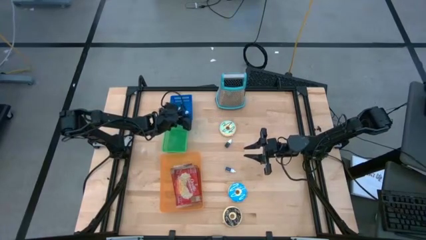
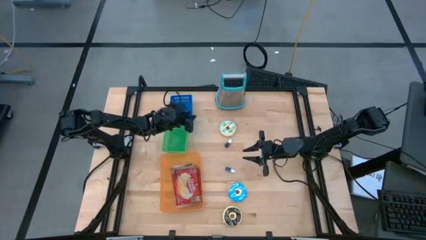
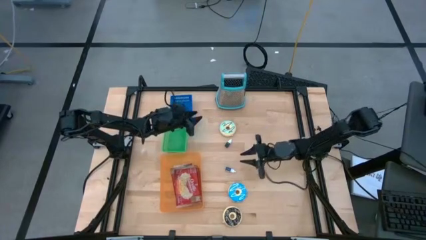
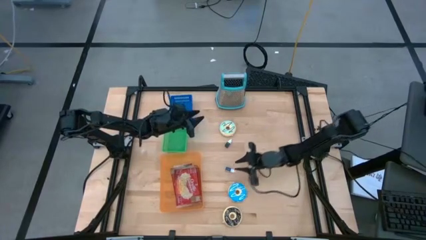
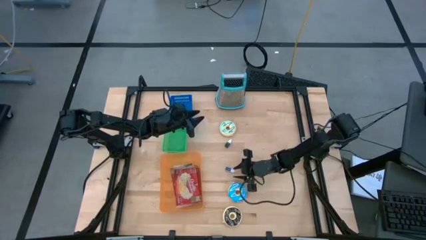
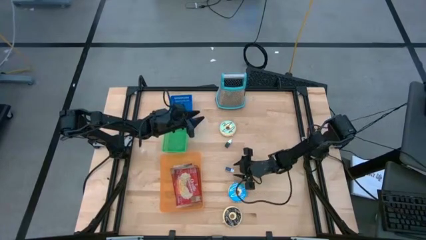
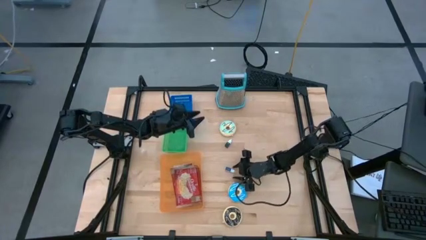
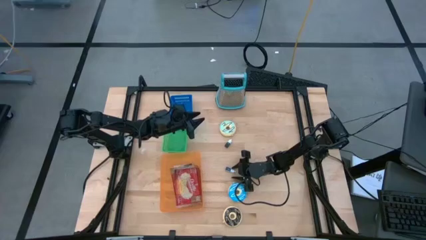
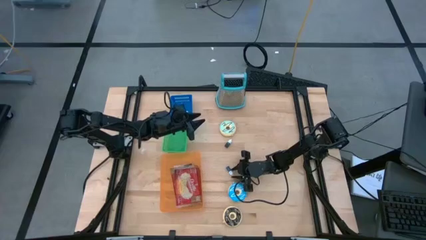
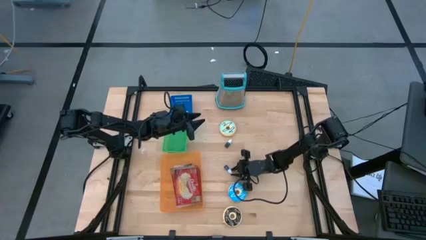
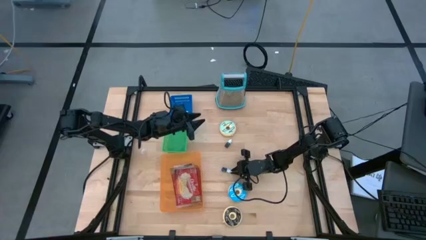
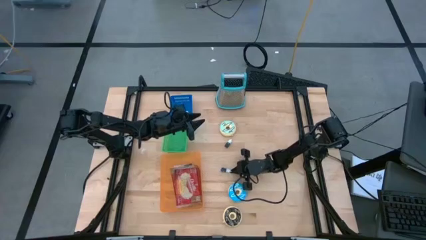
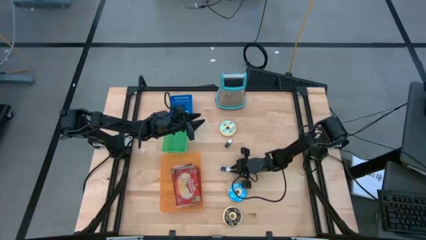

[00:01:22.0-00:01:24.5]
Put the blue food coloring bottle into the blue bin

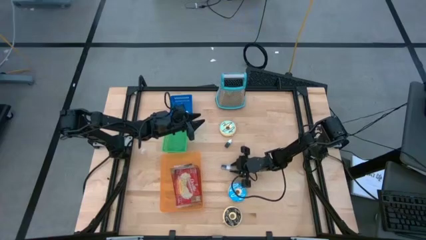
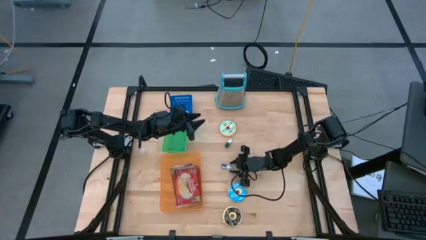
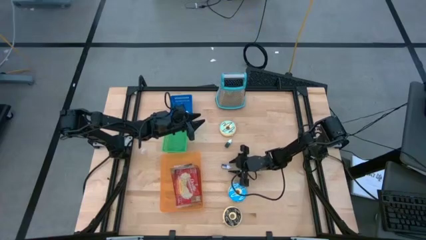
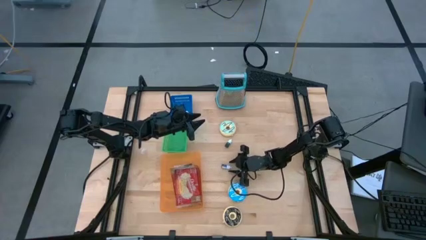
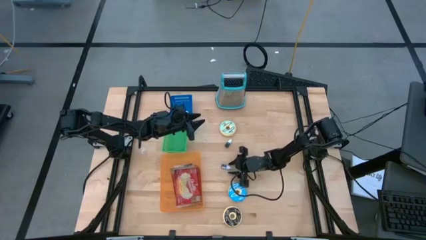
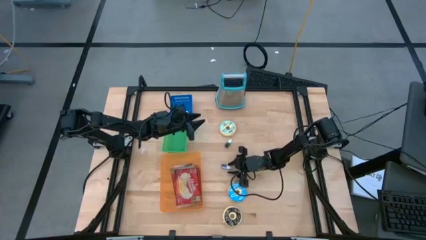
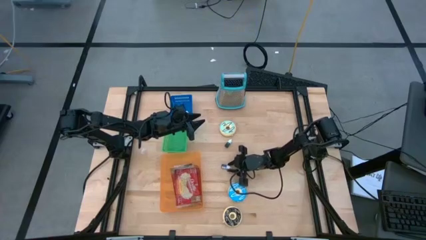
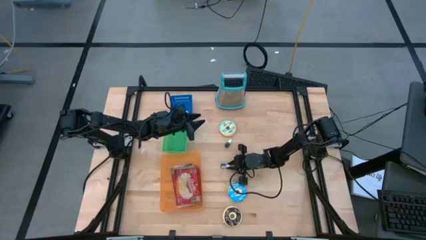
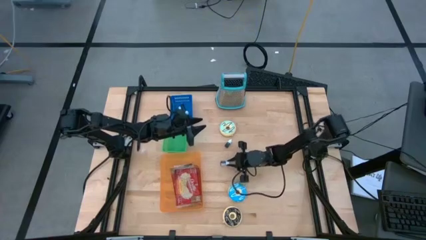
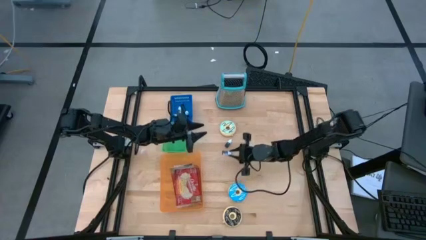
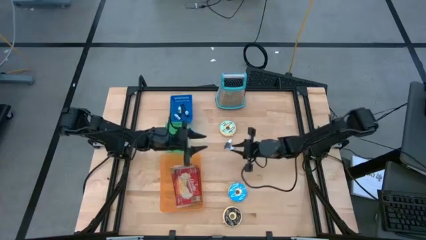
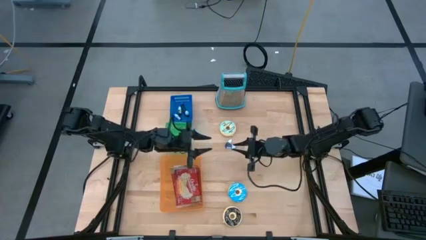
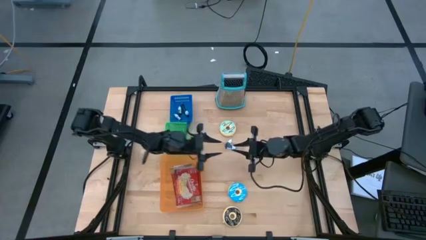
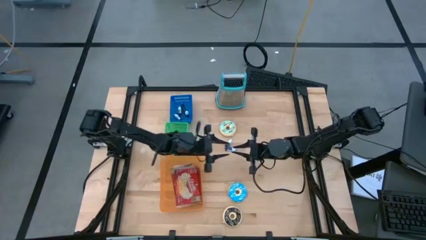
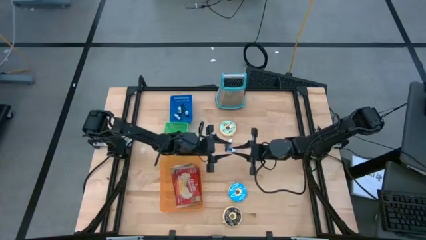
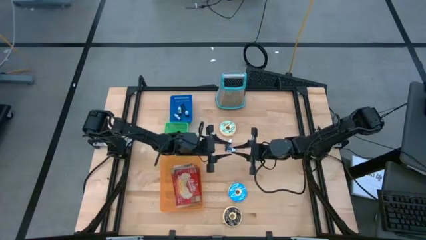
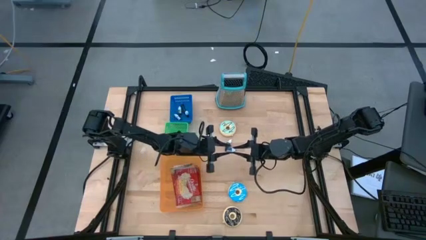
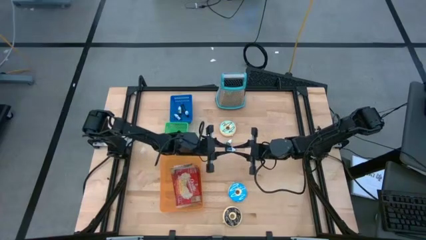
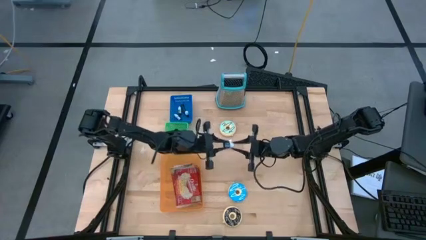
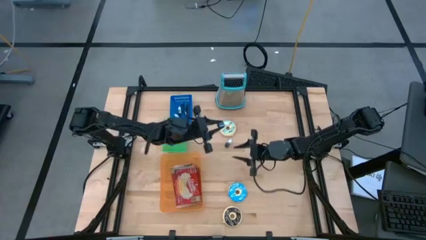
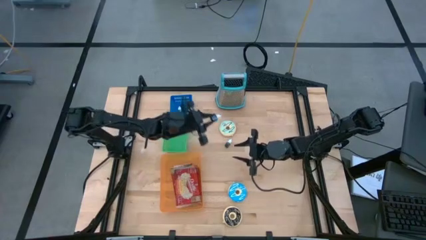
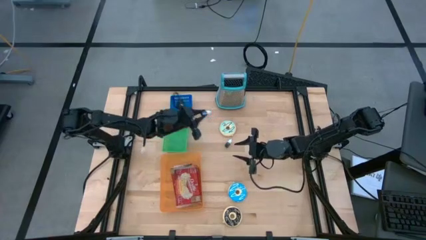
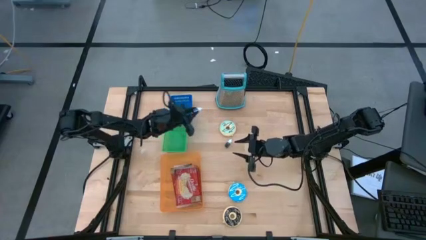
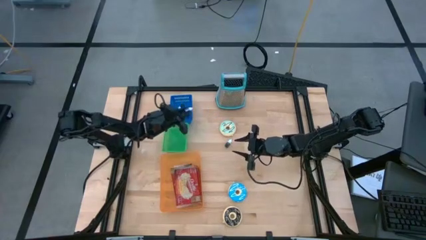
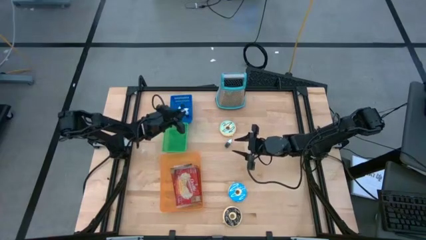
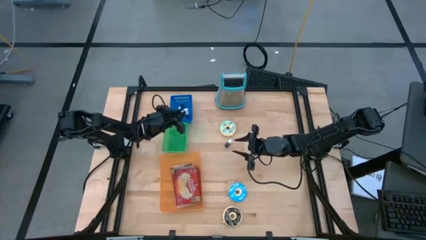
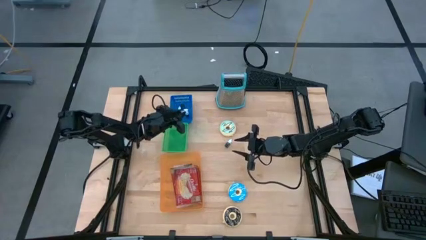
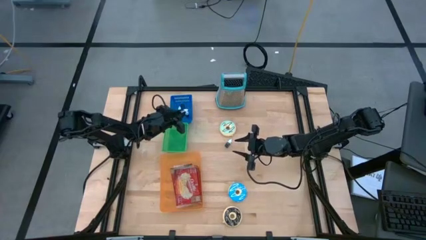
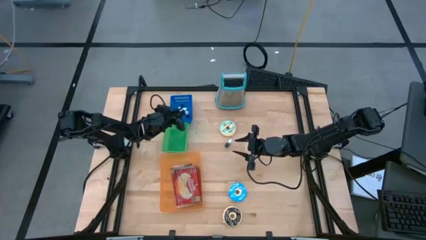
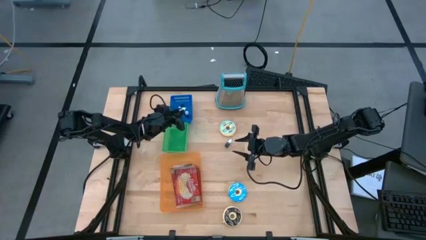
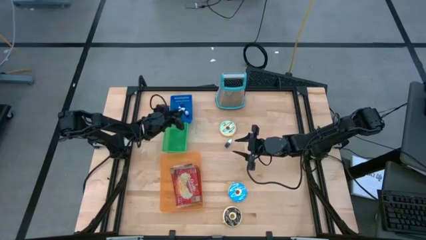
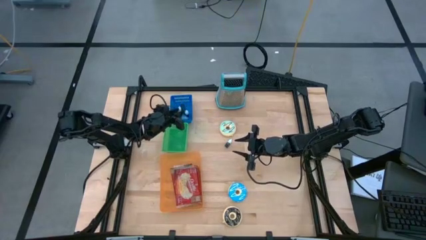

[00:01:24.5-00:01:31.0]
Put the blue food coloring bottle into the blue bin

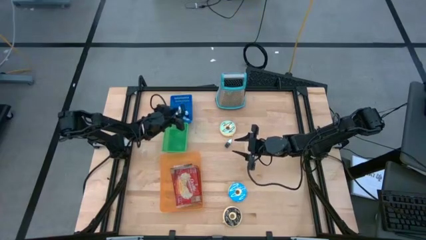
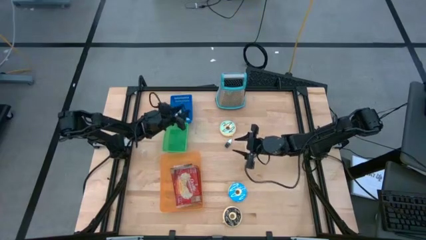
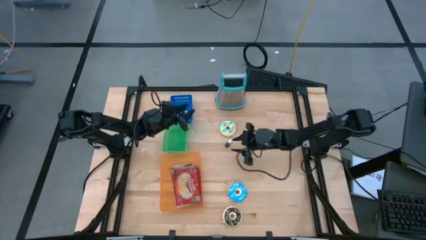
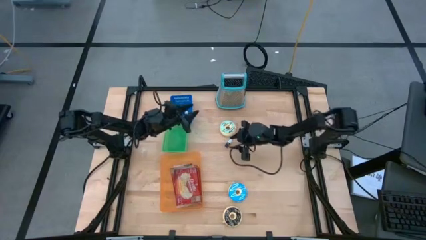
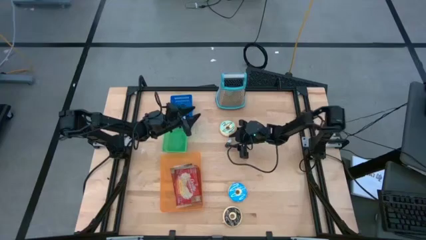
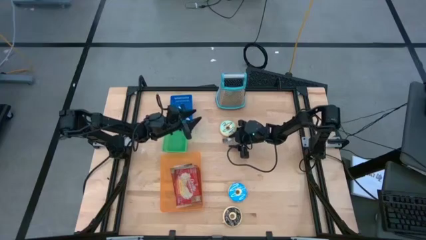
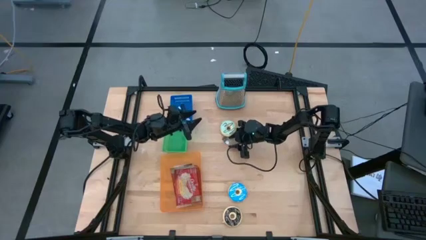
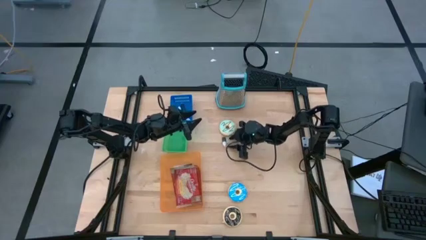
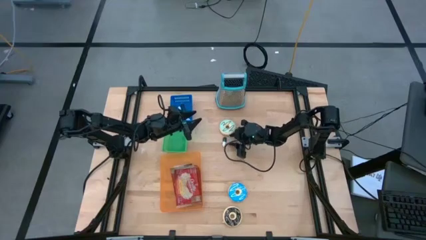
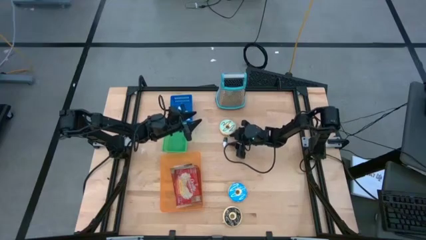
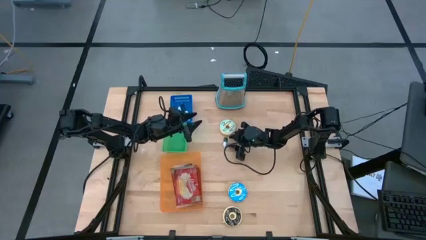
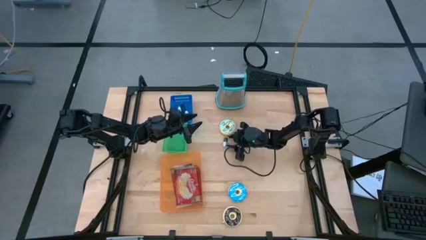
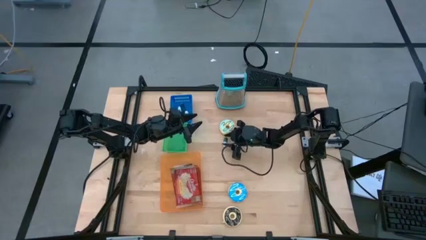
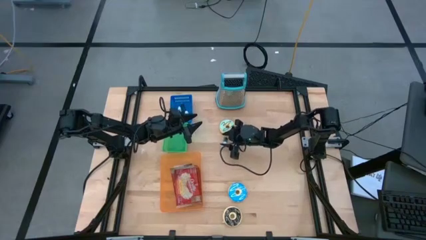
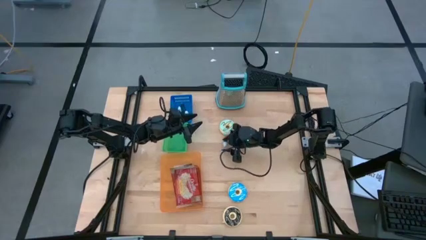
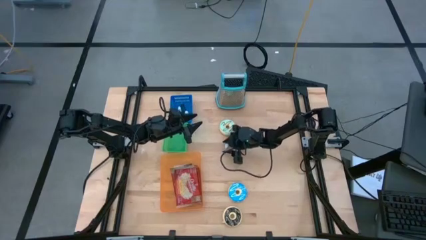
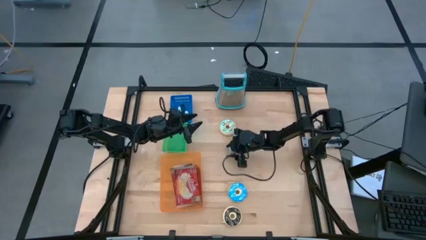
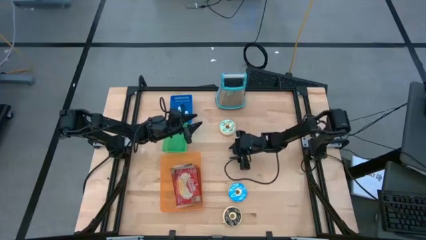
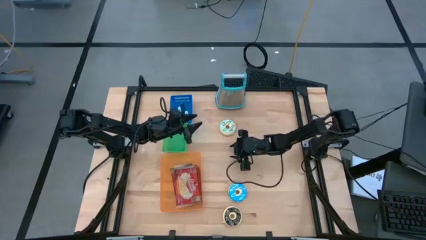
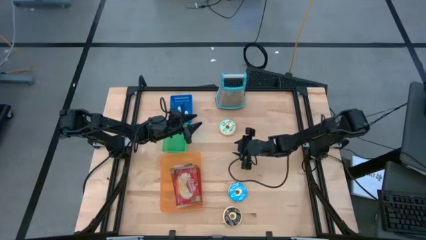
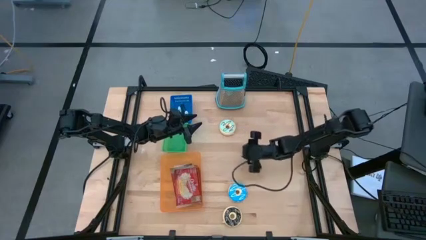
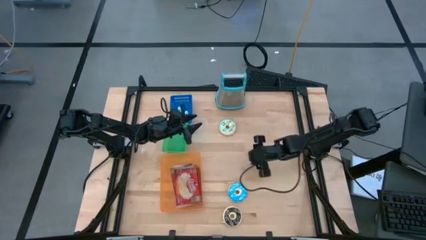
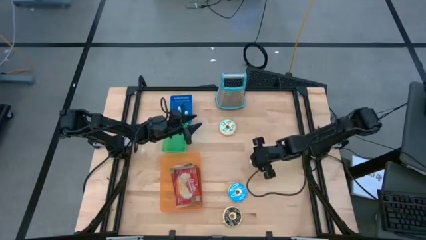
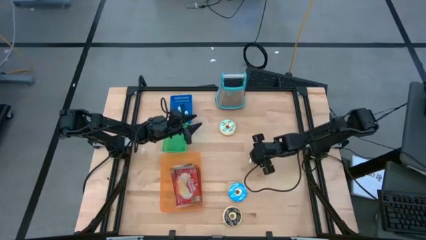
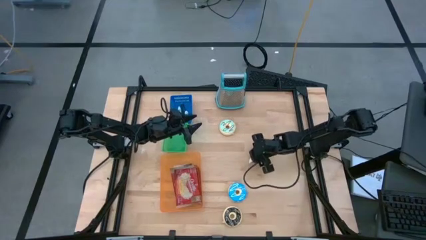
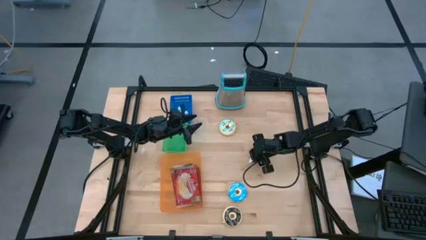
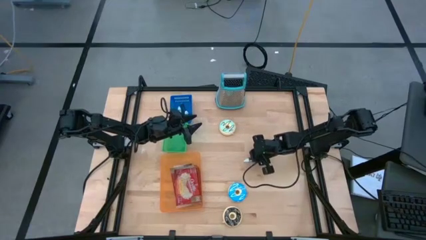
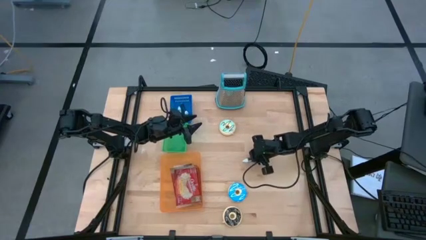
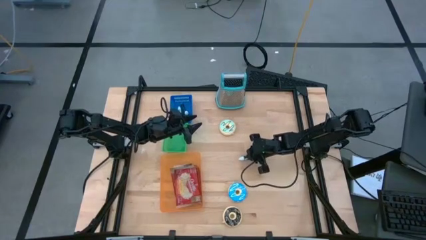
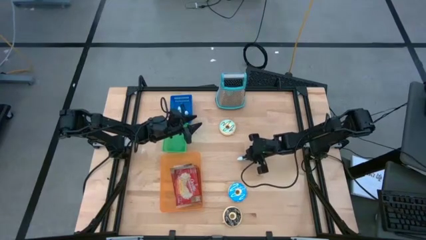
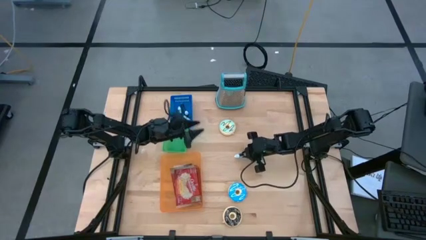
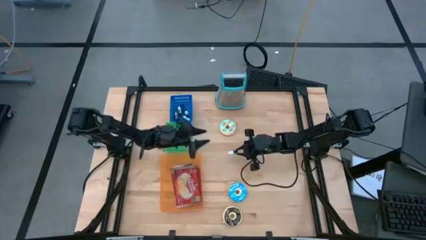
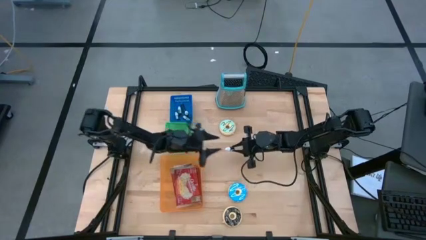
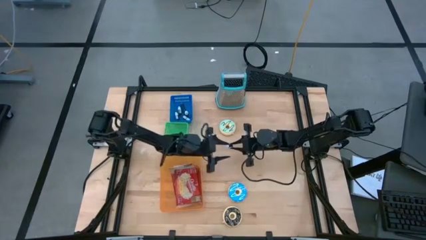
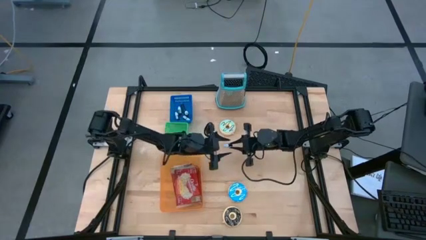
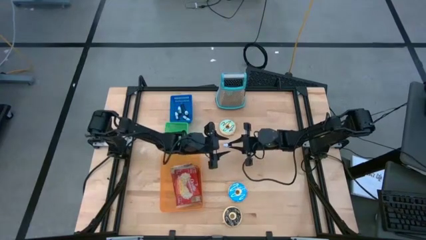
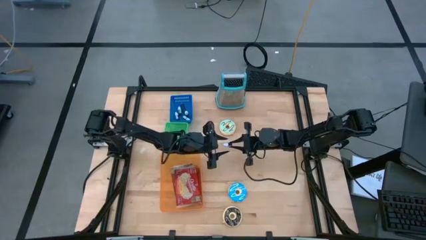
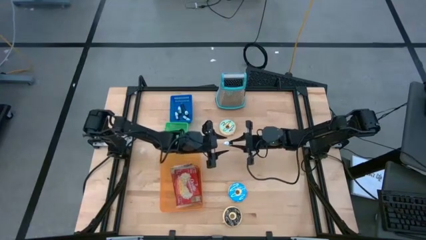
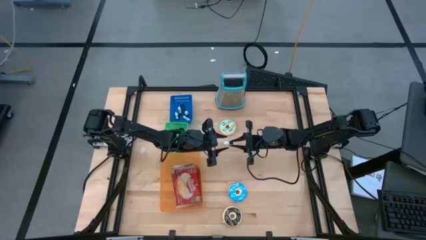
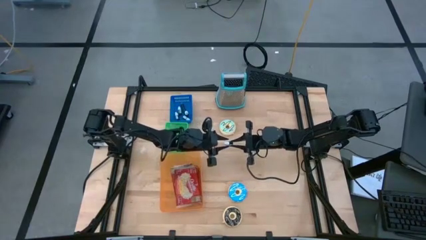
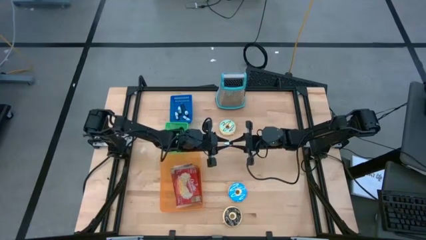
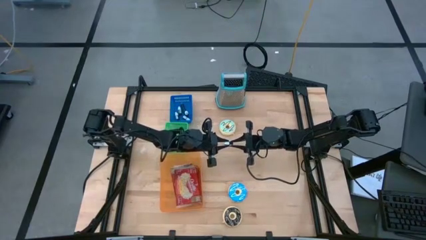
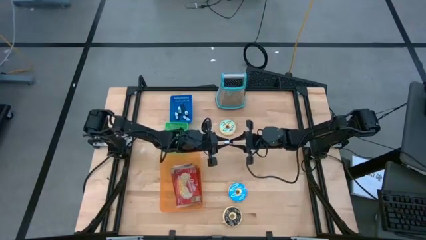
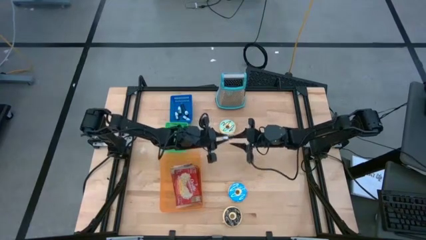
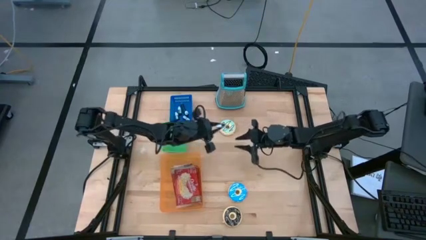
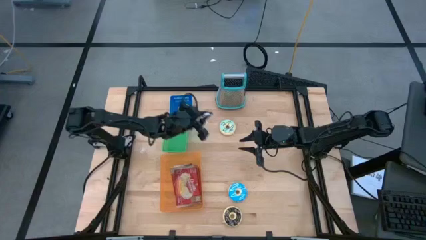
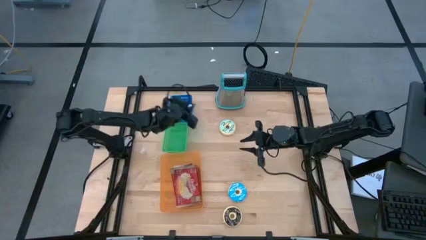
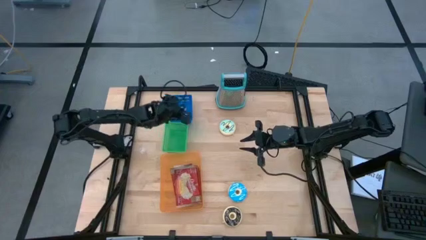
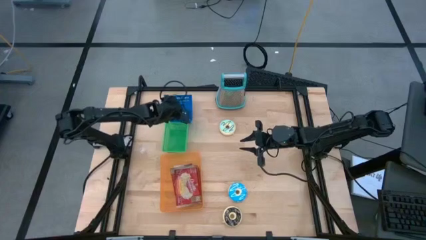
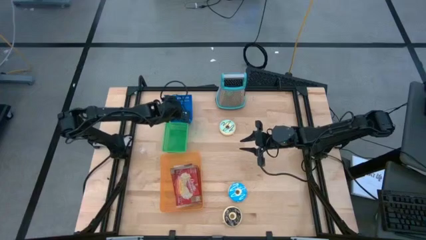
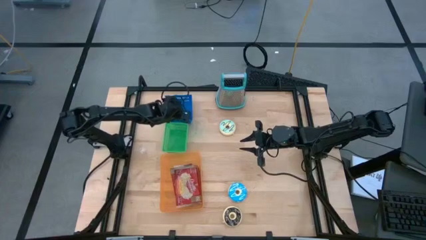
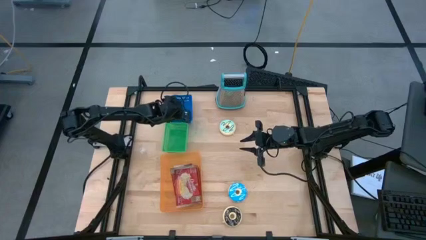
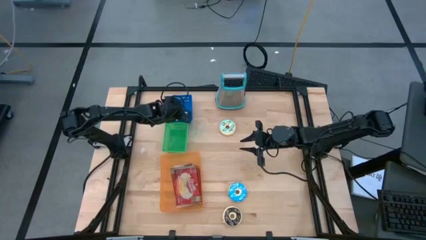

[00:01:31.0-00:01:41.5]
Put the black food coloring bottle into the blue bin
